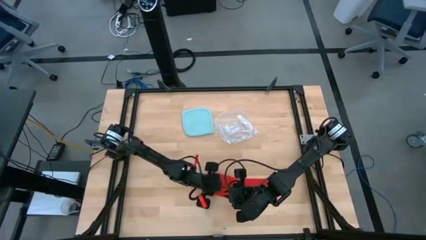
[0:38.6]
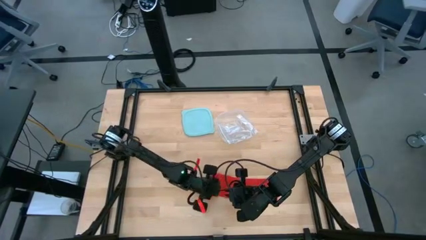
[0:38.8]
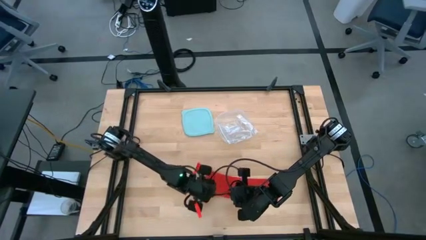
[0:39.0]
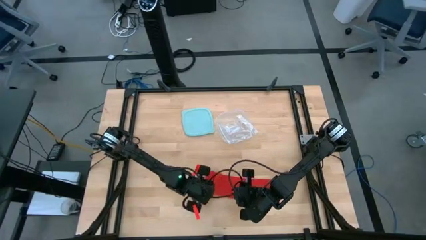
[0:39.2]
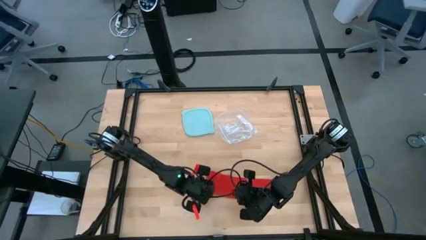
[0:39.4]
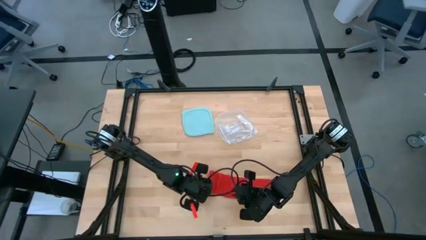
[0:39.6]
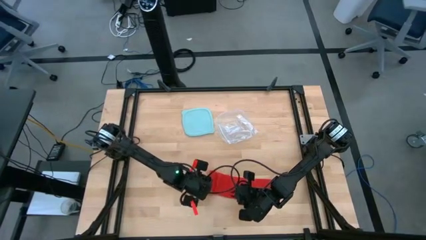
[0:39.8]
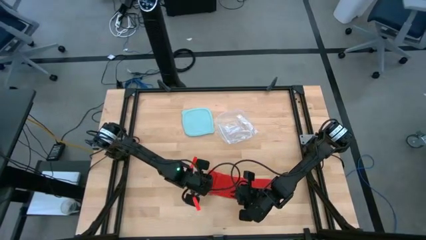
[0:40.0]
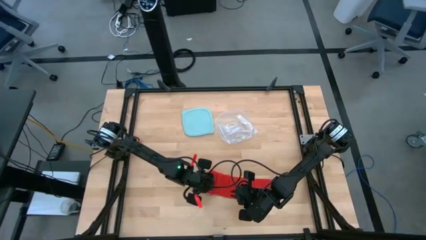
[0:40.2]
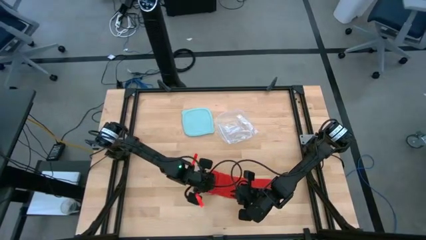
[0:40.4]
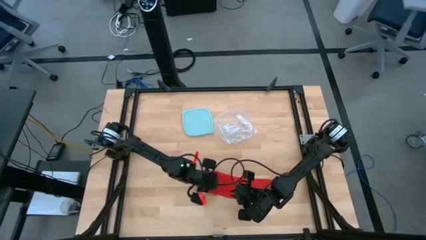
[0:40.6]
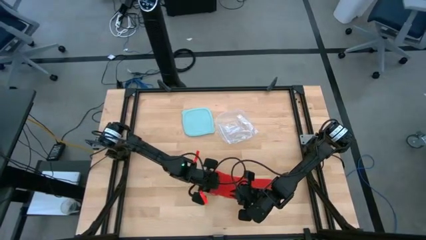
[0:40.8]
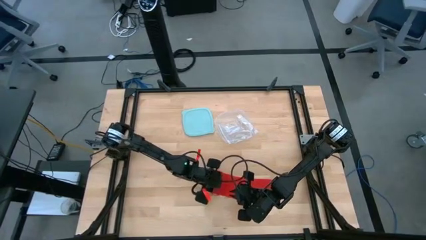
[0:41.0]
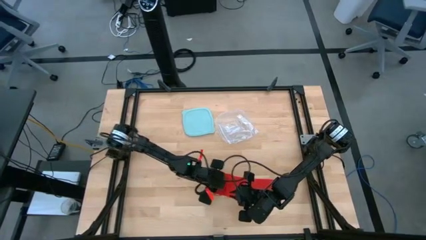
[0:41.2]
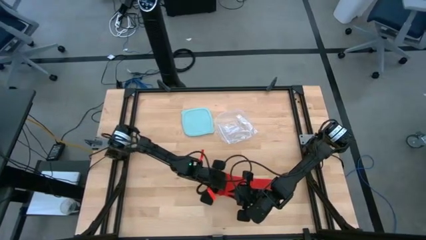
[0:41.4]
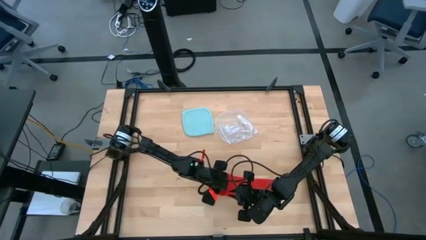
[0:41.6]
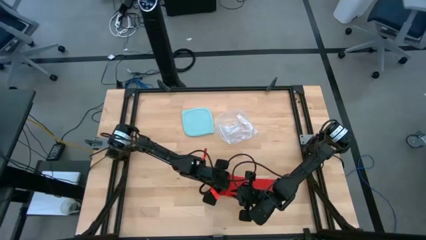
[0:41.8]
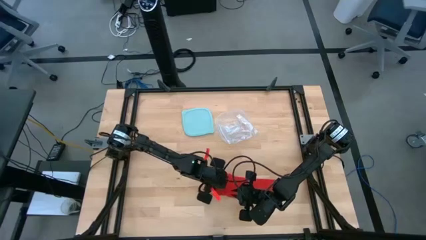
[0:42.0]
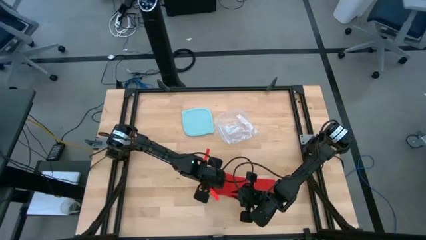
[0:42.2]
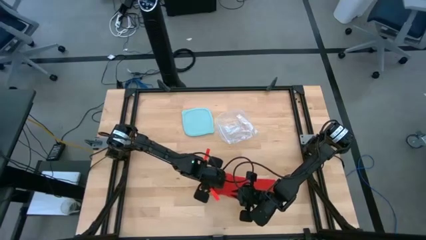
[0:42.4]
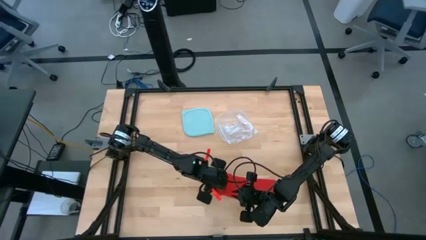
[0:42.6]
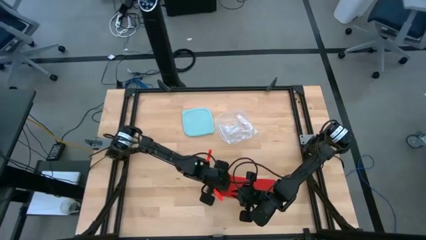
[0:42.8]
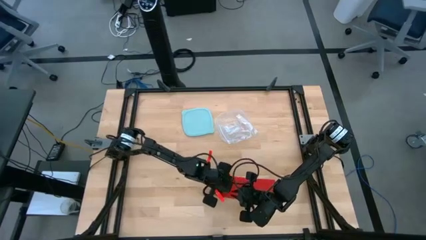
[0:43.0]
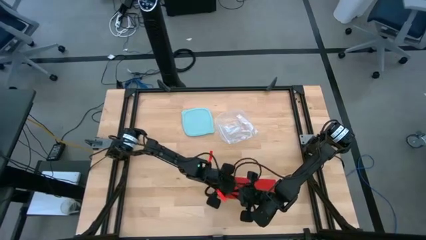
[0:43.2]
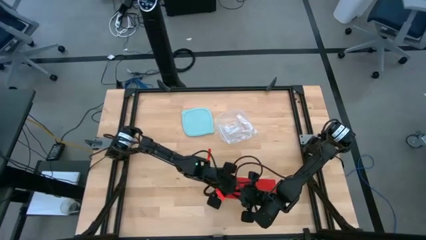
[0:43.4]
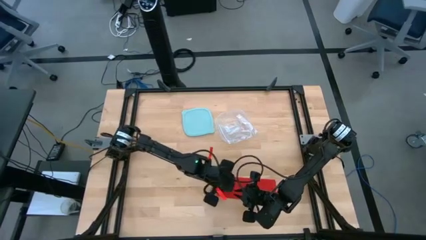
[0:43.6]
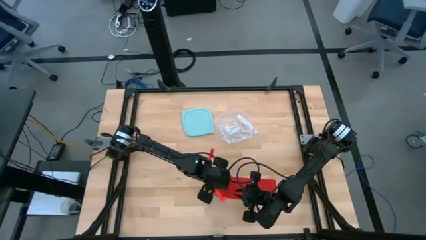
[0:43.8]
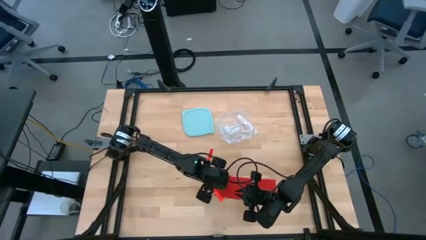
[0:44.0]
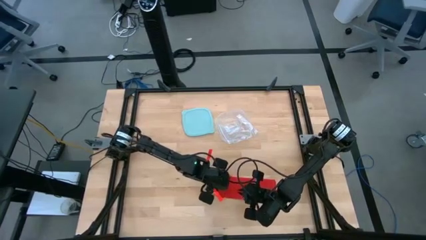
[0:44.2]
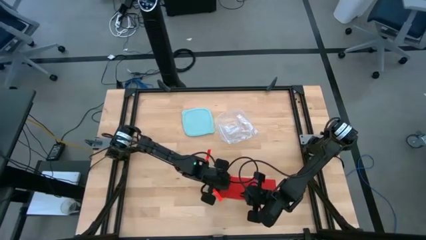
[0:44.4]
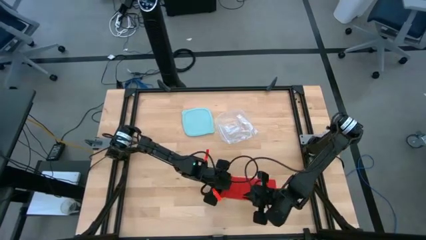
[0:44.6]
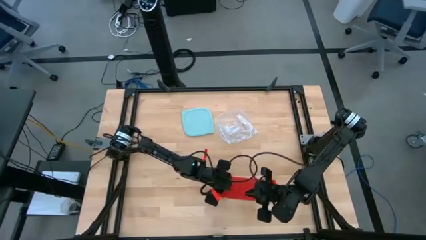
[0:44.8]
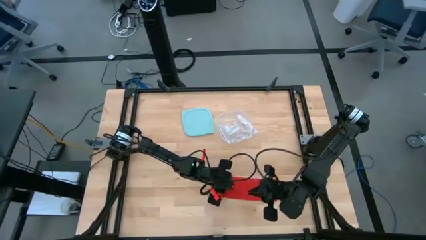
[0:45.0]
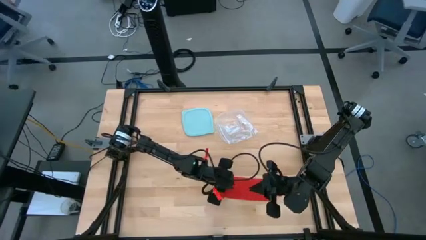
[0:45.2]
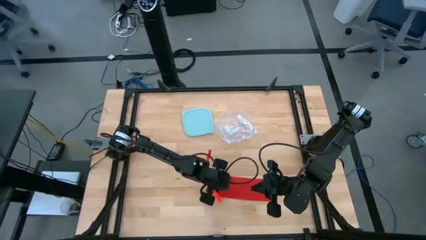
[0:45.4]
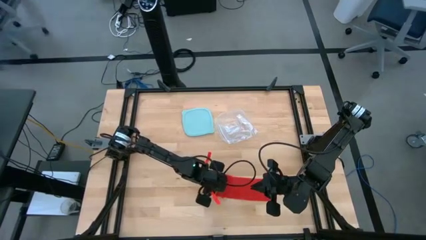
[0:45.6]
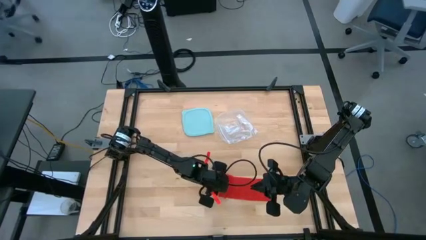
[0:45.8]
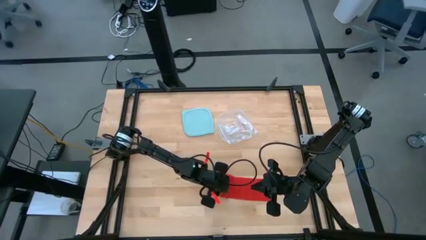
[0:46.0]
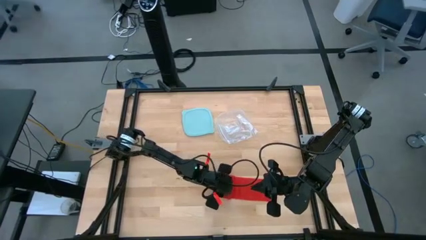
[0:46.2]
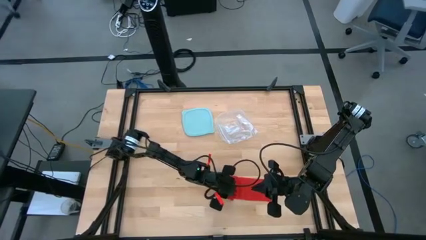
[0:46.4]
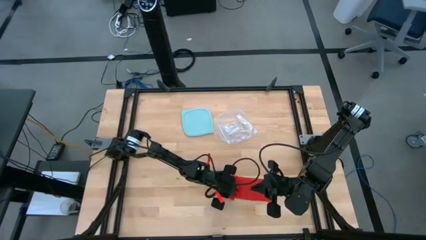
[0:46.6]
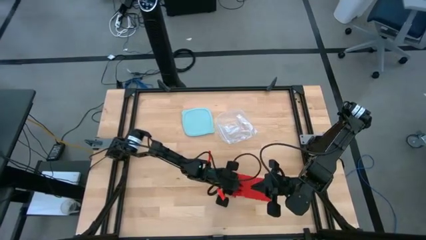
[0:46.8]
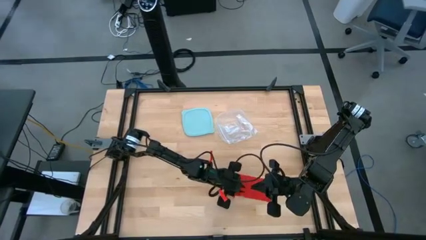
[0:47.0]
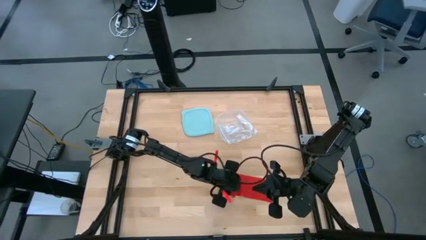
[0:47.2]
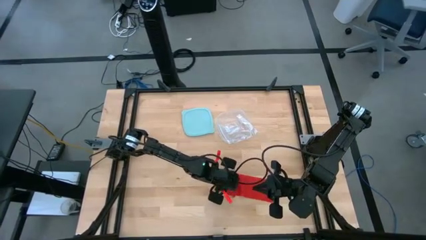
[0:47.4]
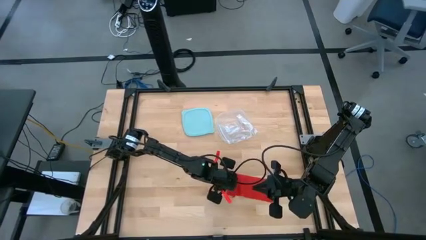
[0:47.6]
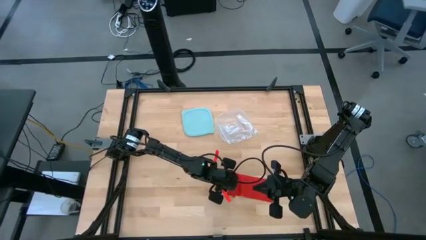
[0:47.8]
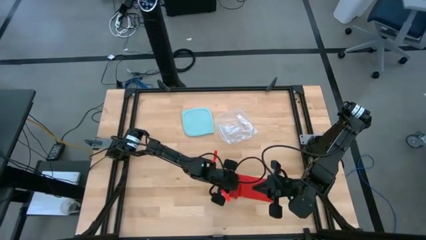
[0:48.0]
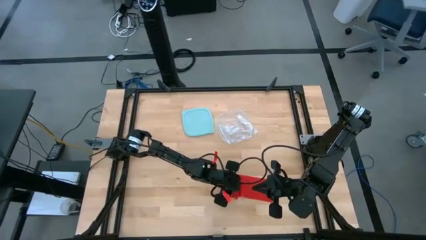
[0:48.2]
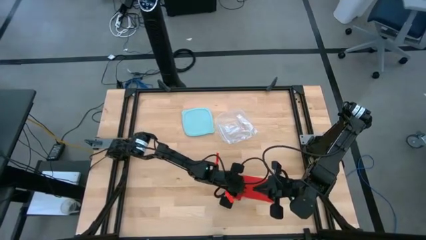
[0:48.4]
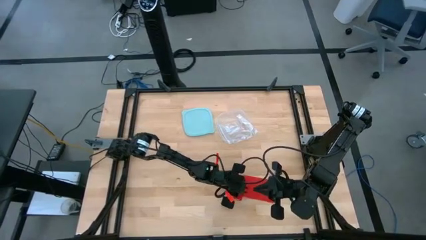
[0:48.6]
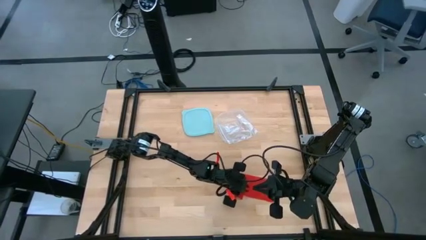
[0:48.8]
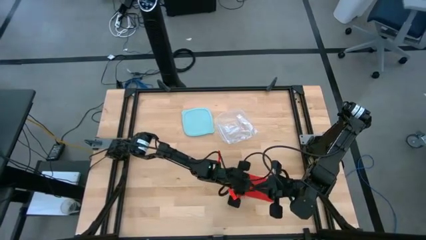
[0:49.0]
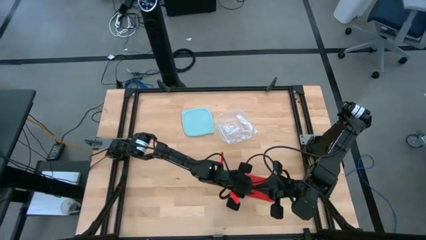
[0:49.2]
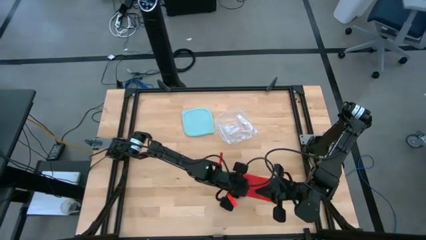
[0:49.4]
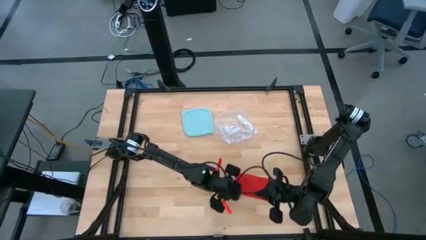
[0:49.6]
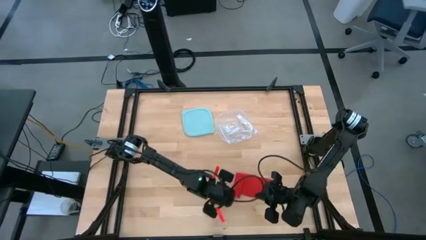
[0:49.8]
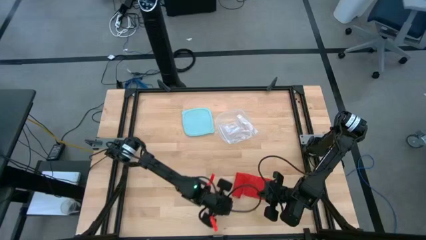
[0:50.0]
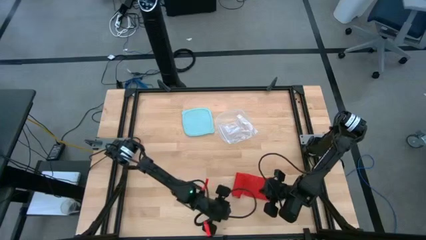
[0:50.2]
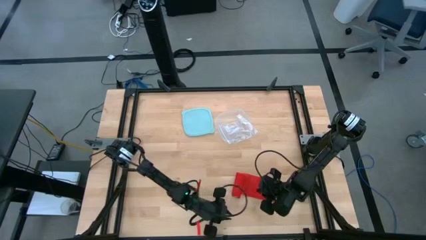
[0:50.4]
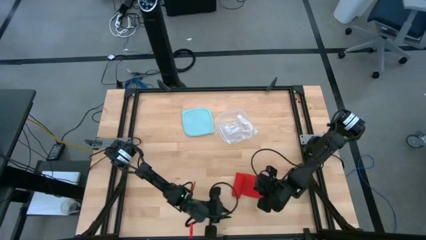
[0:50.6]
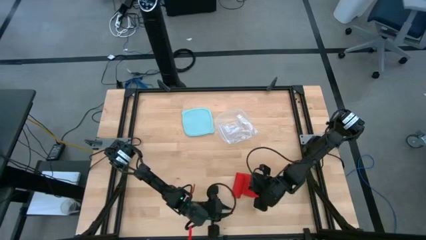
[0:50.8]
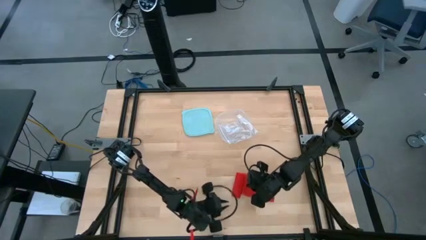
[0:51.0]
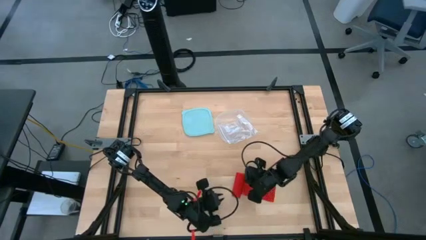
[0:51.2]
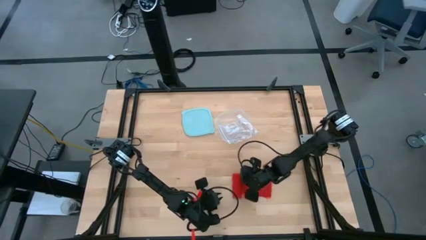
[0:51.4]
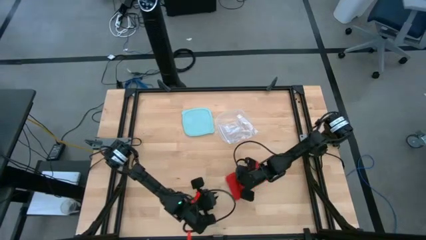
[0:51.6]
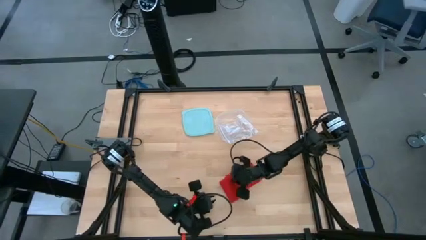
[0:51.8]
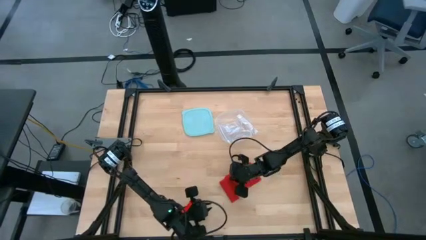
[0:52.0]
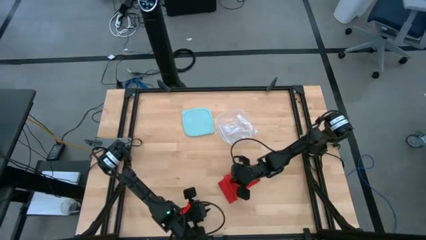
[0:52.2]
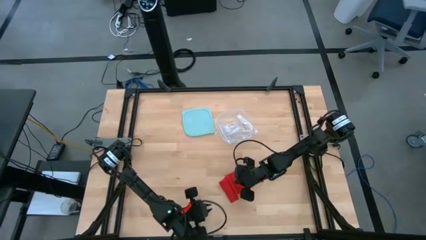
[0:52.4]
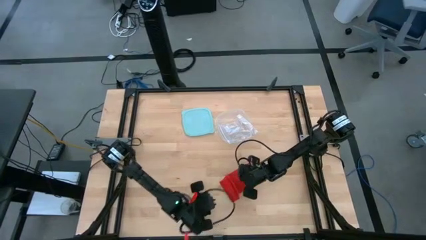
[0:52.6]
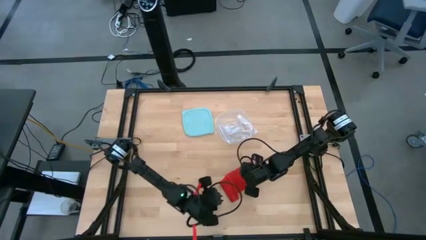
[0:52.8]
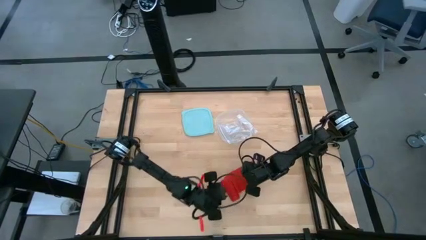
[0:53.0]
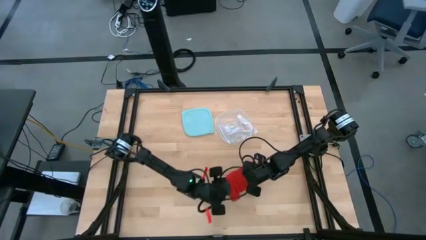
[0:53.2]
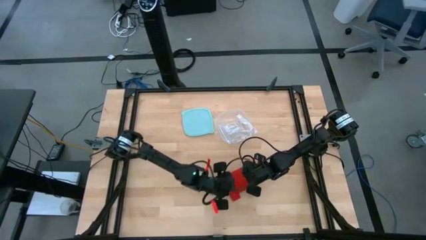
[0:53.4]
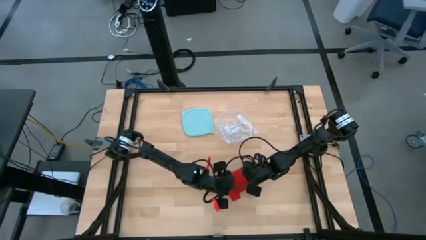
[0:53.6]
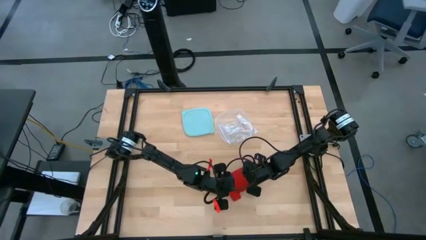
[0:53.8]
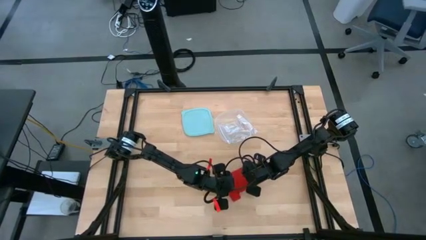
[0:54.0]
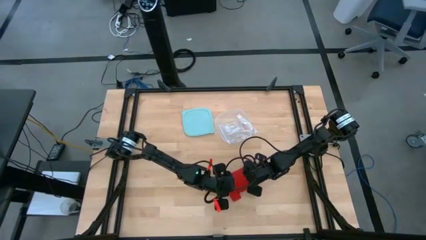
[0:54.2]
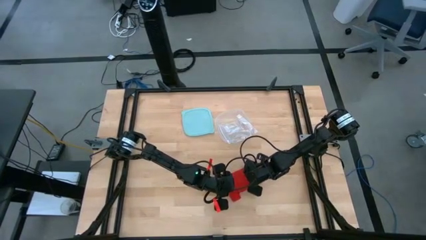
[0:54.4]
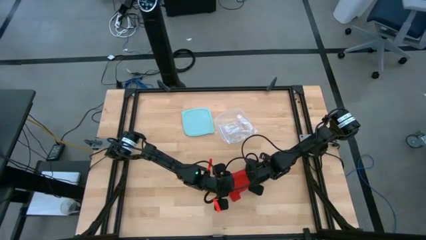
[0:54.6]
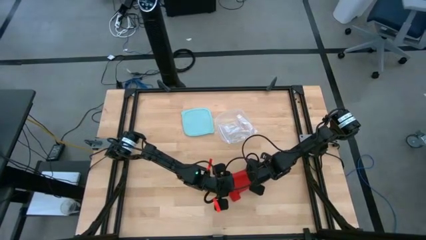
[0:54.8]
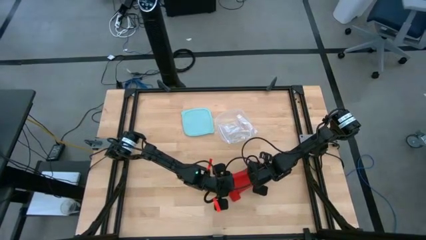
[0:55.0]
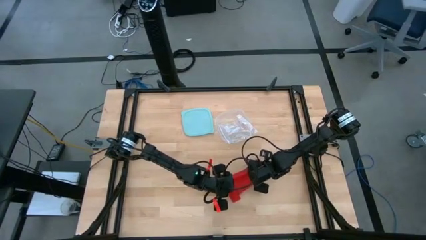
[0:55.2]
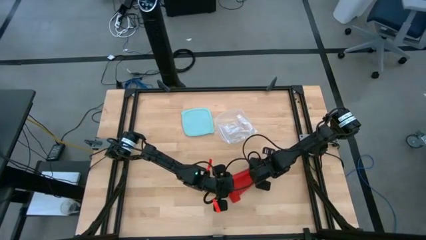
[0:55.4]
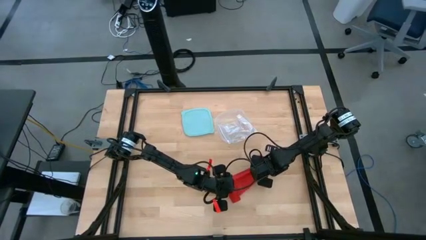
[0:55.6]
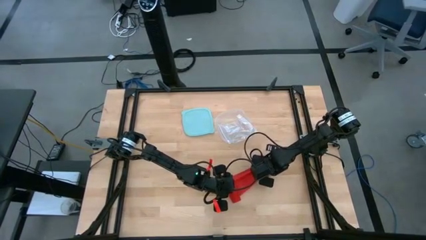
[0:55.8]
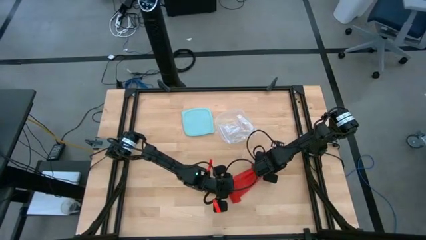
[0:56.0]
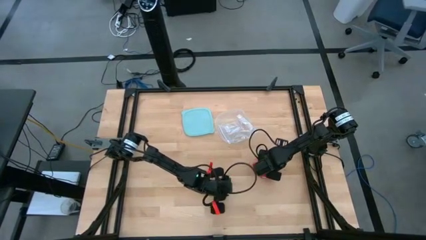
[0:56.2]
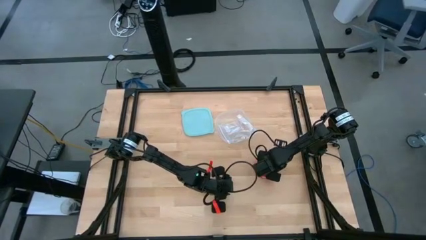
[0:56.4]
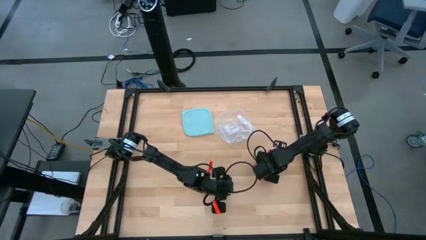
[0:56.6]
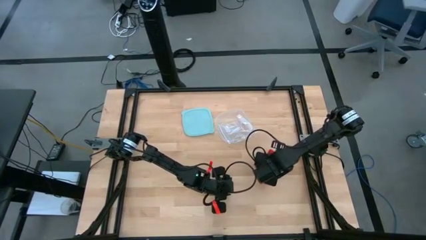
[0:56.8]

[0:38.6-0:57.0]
Task: Roll bandage
Roll the red bandage
